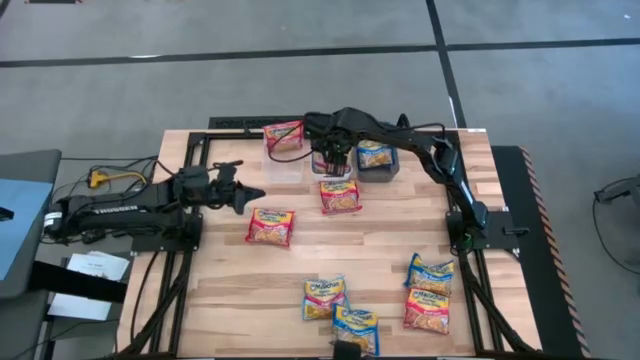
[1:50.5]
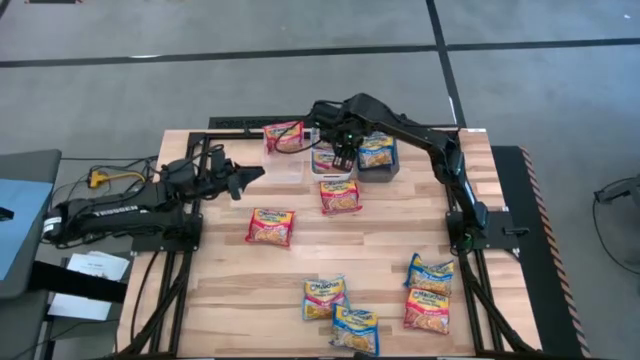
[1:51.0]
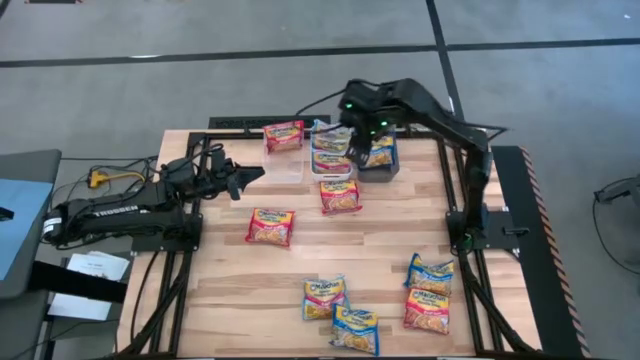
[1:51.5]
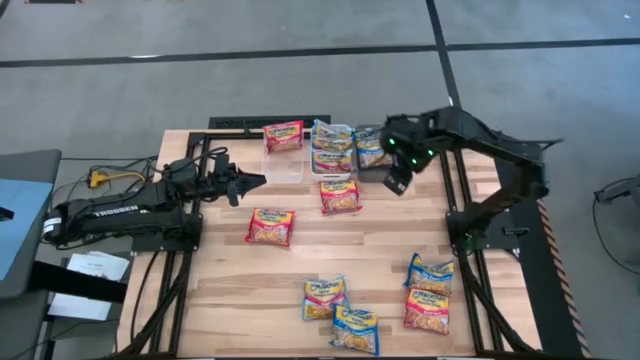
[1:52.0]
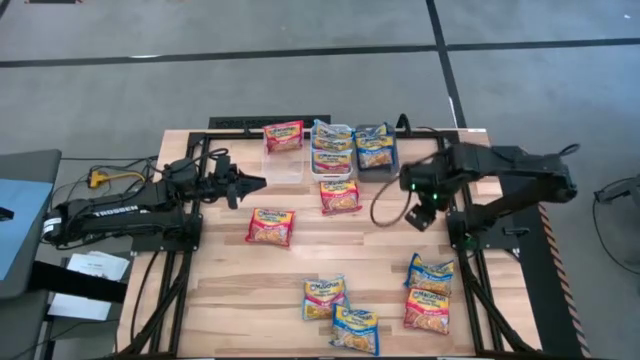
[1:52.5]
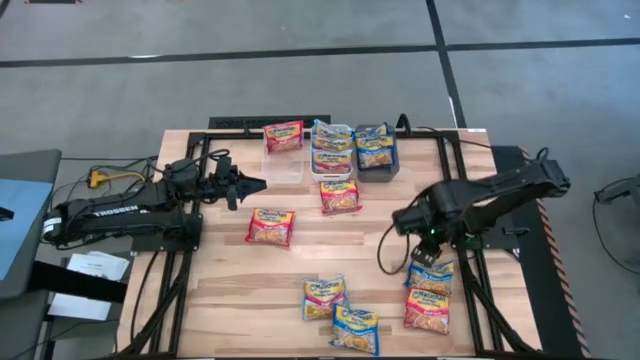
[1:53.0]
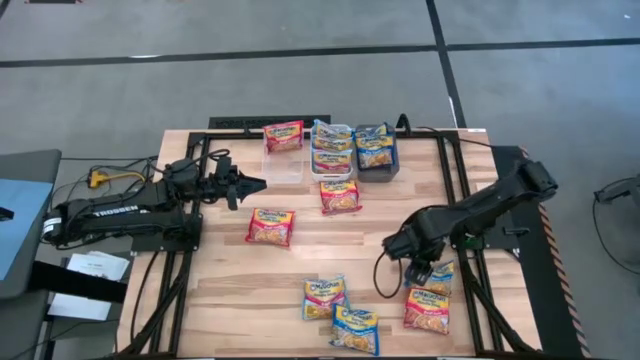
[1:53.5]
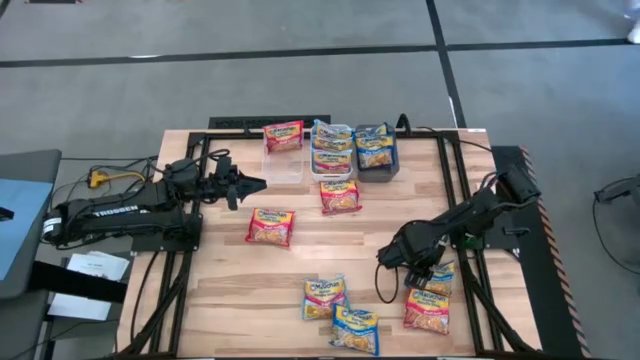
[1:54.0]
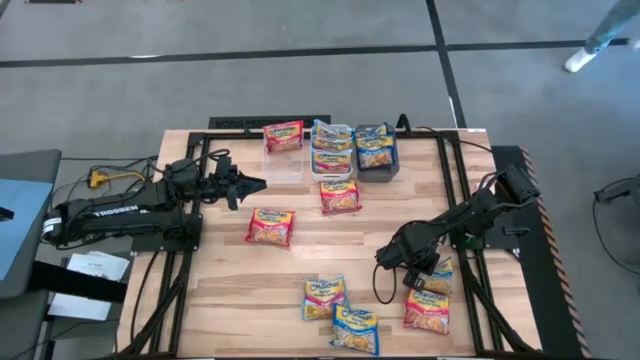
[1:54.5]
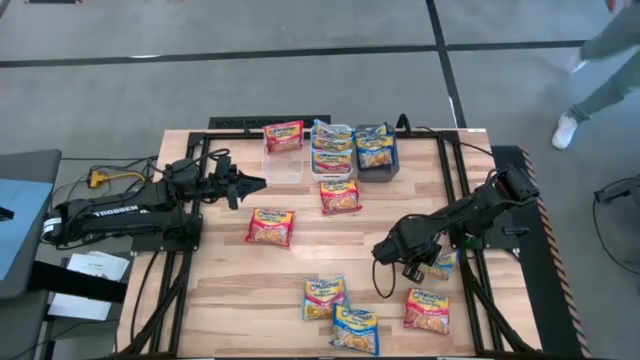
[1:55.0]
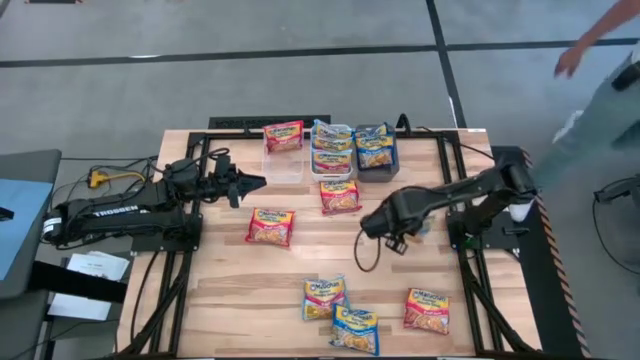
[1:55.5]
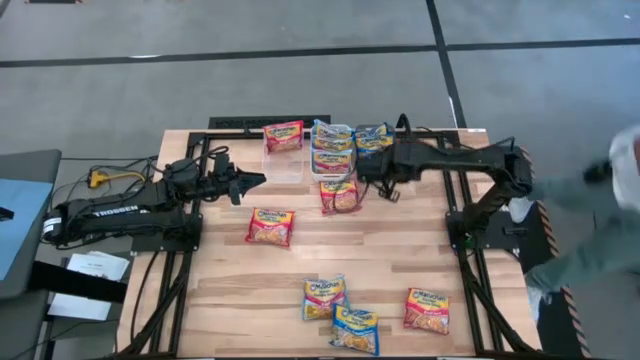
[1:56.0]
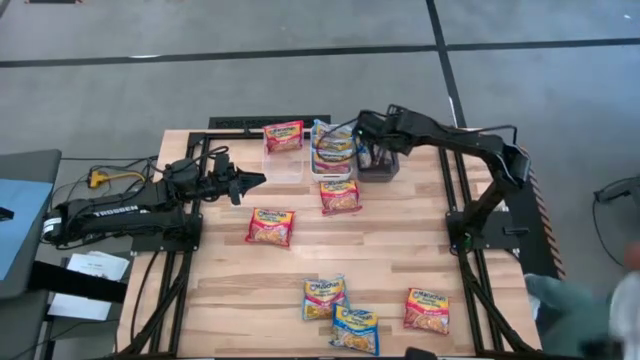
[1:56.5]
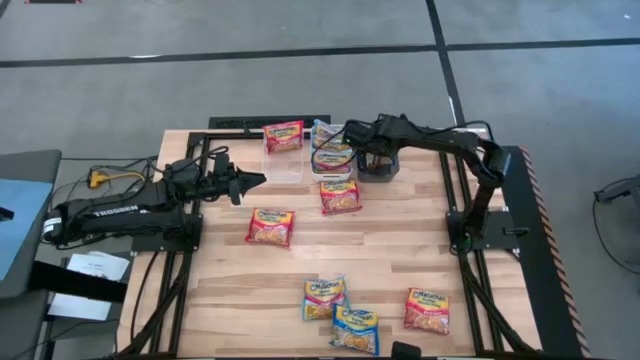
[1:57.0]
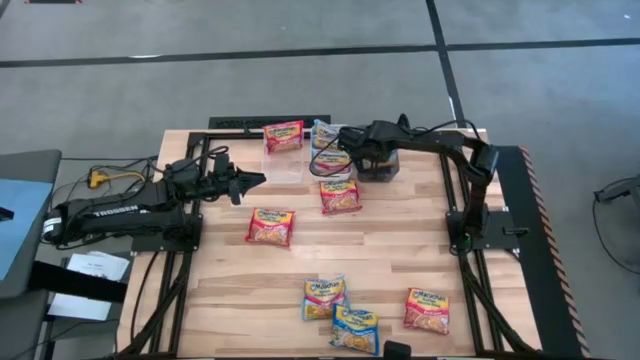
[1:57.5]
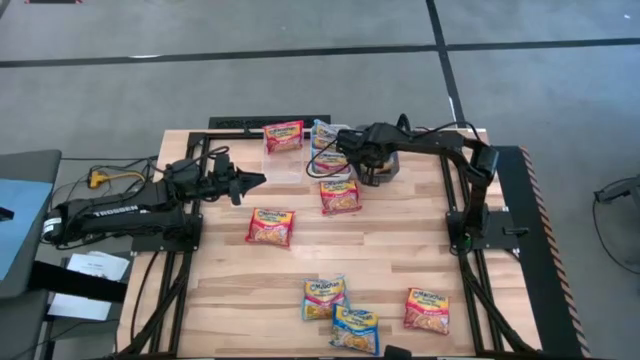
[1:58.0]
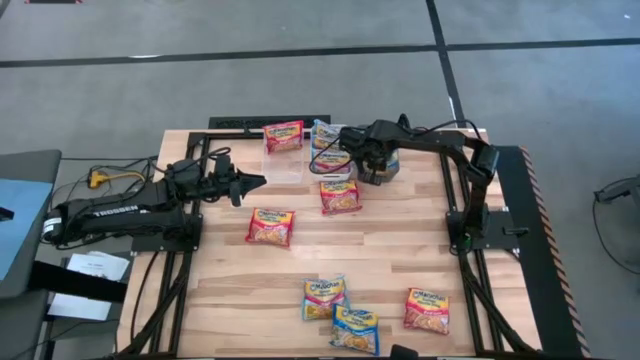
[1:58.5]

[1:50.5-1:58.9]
Task: Sort Maruchan noodles
Put the blue noodle pack into the black bin

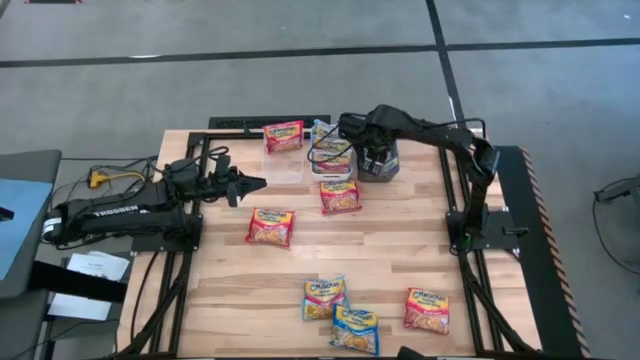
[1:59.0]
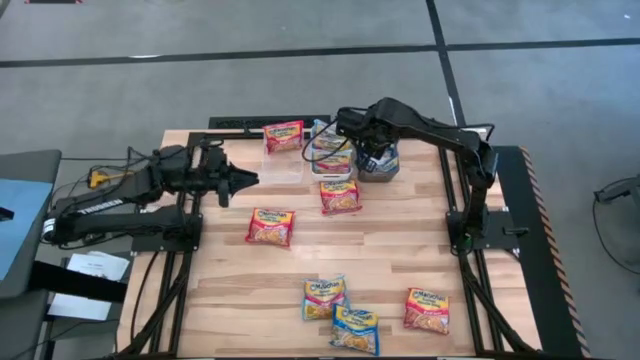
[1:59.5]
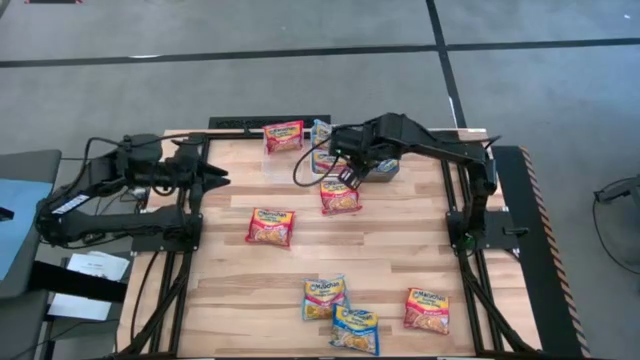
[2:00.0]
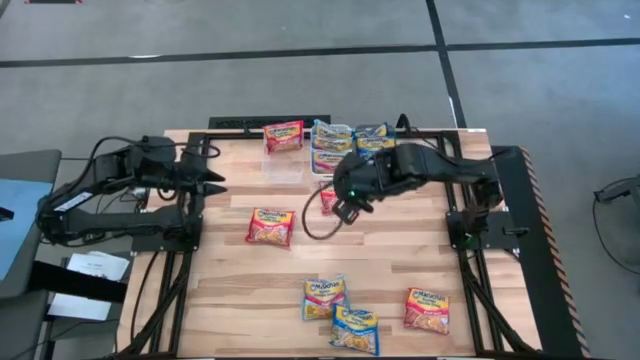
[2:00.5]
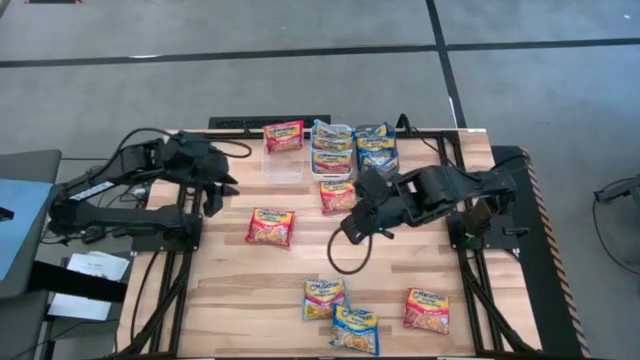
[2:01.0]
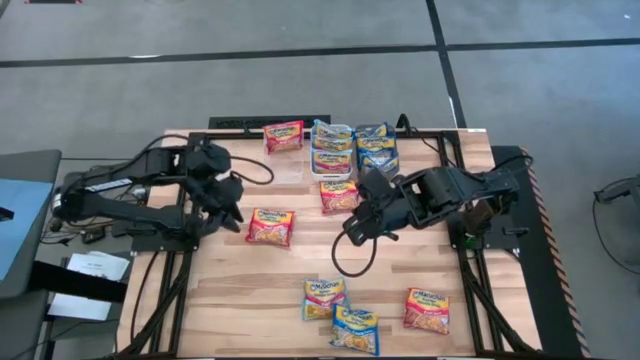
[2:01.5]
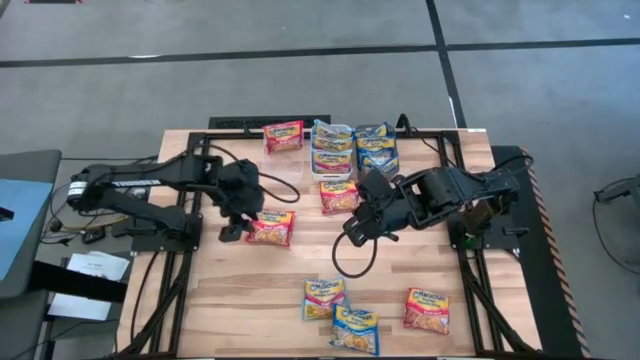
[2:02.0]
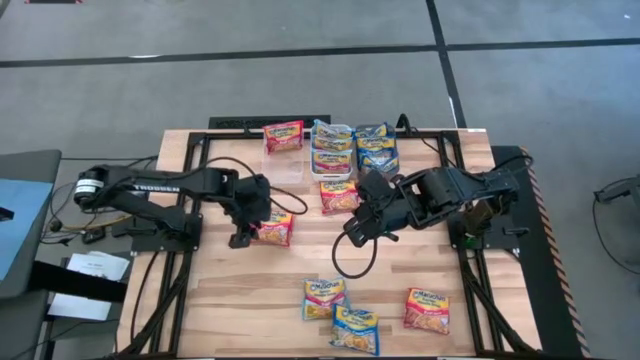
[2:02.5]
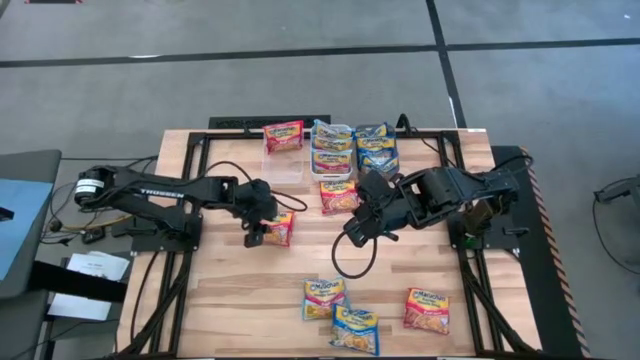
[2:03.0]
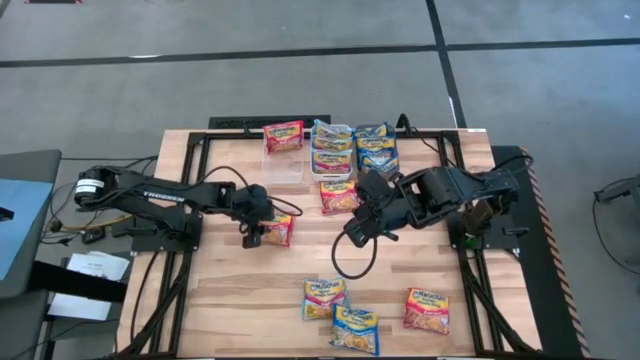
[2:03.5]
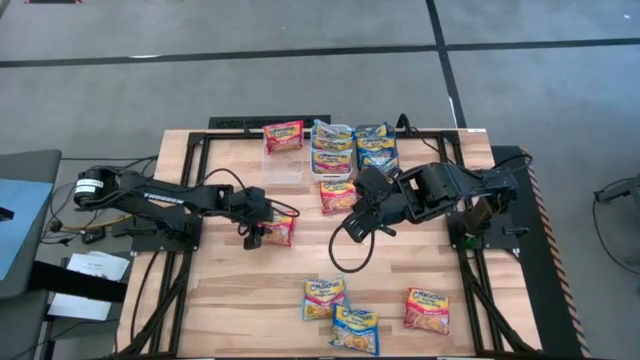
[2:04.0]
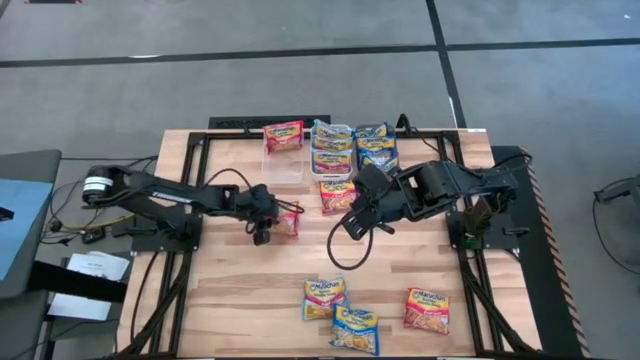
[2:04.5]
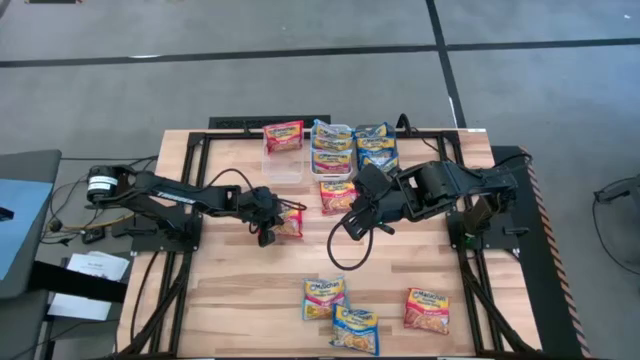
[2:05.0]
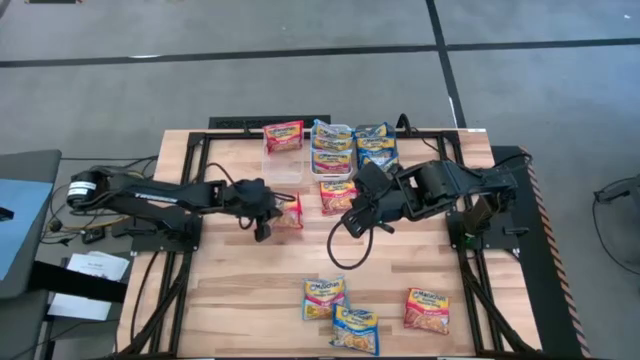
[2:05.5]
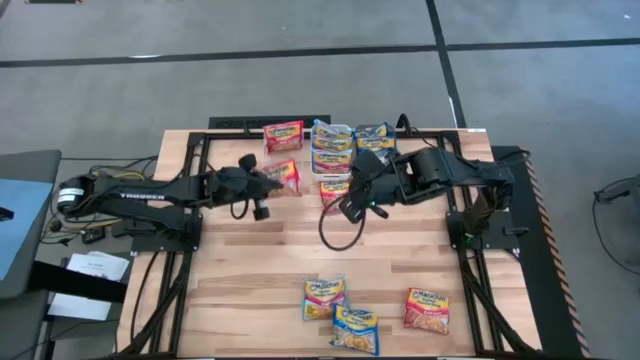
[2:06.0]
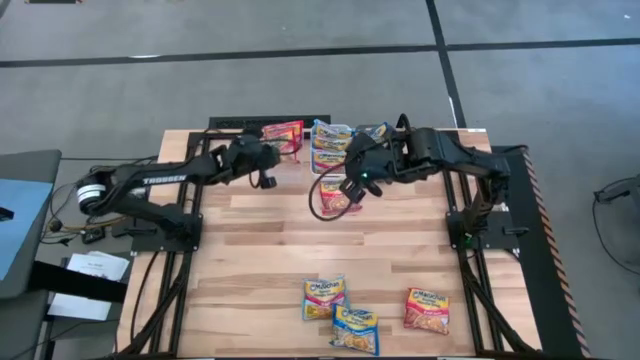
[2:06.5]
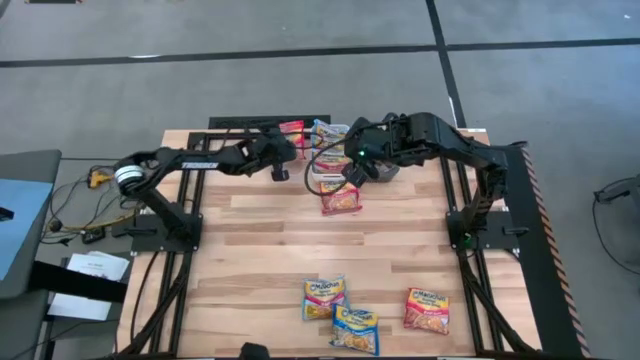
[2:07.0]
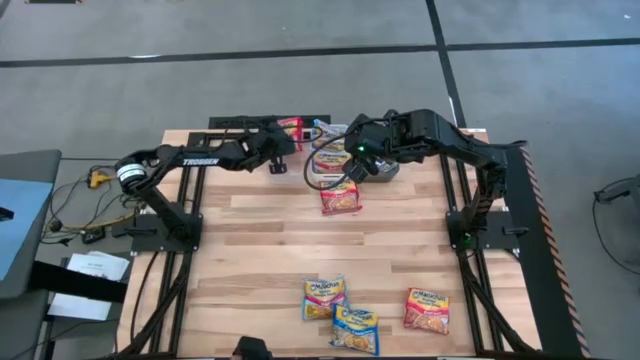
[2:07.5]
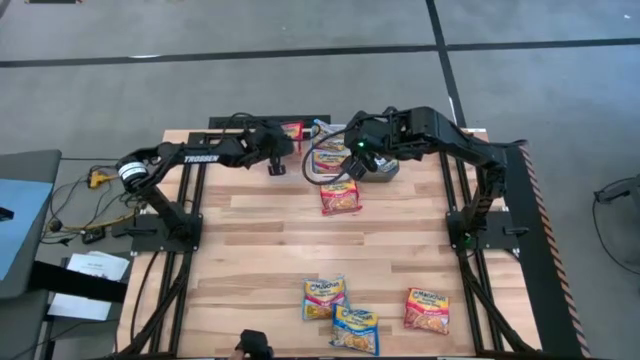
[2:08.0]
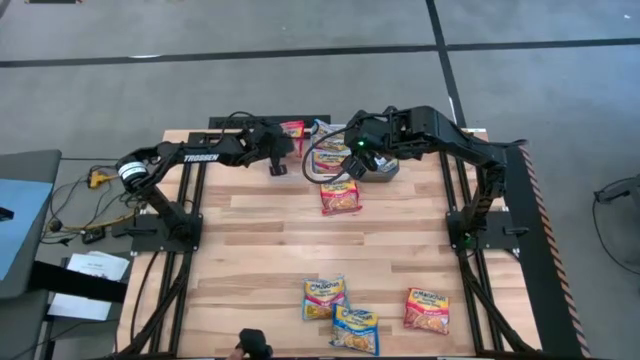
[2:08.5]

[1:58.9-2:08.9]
Put the red noodle pack into the transparent bin

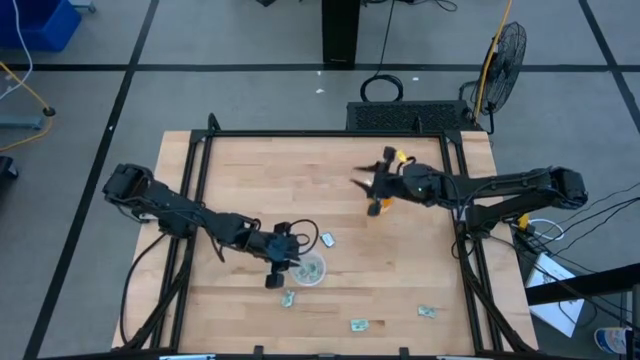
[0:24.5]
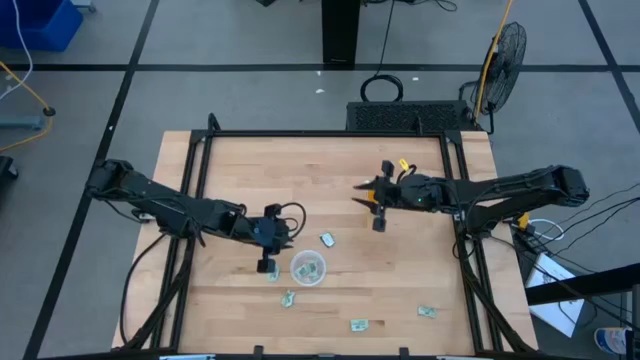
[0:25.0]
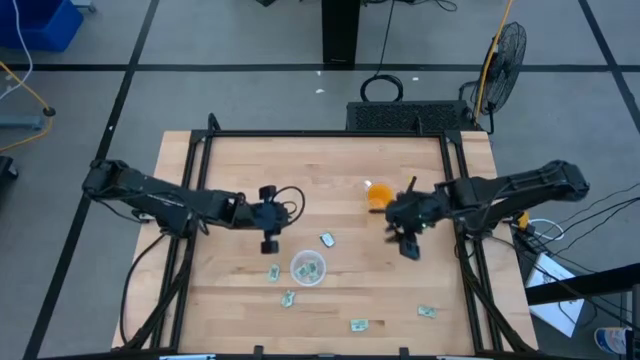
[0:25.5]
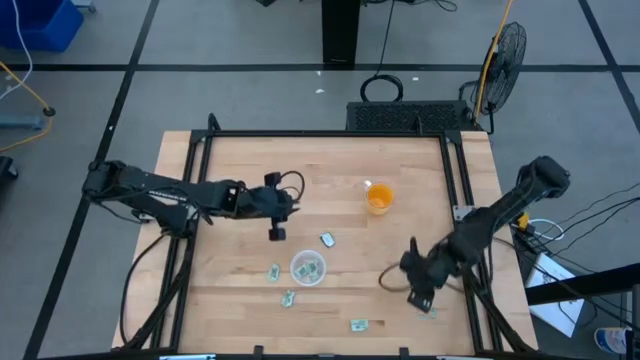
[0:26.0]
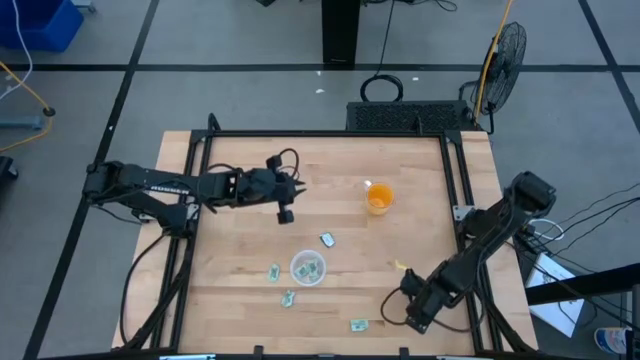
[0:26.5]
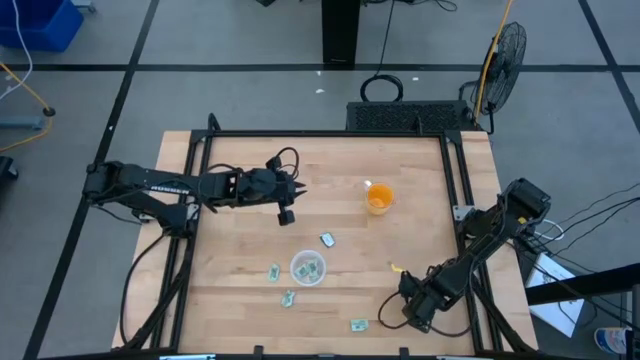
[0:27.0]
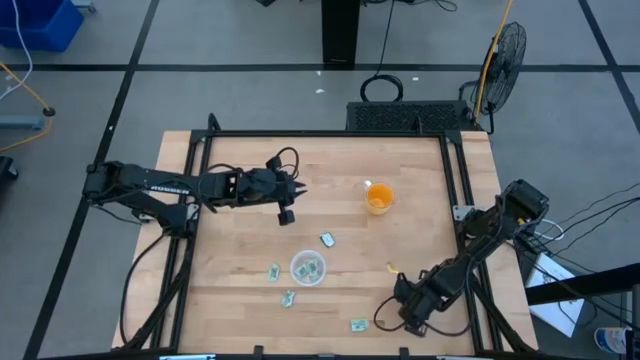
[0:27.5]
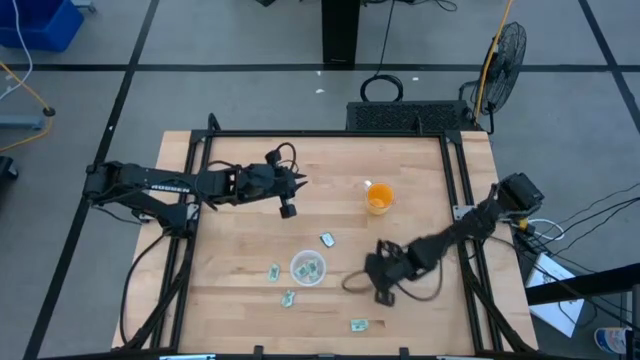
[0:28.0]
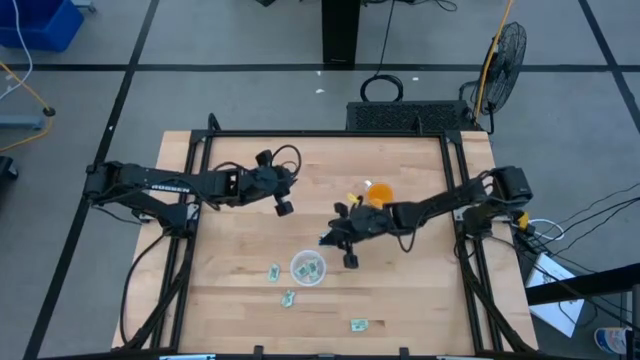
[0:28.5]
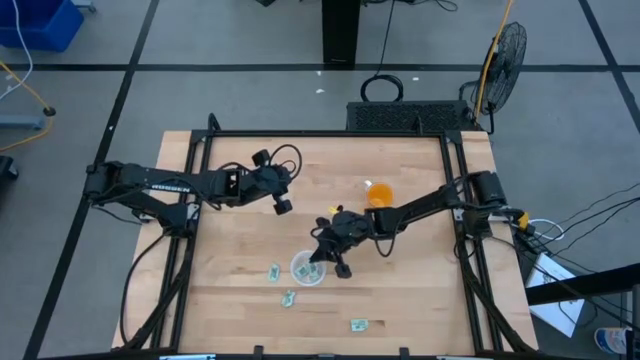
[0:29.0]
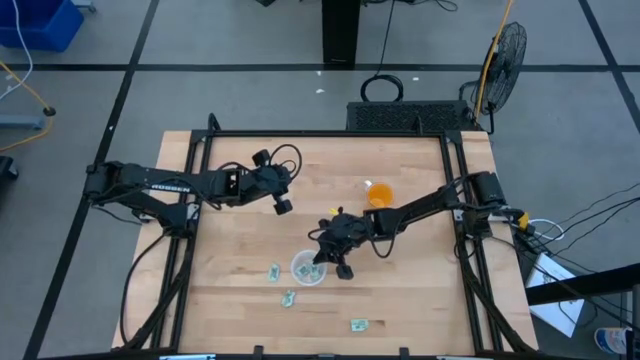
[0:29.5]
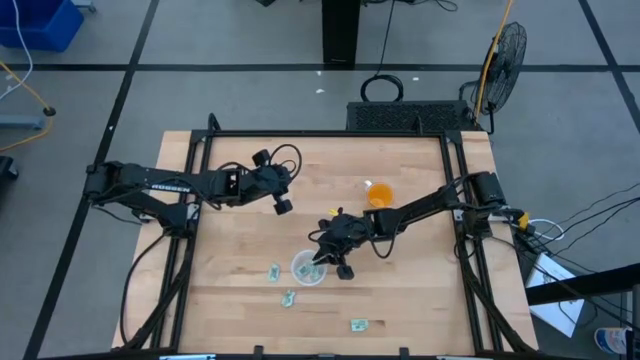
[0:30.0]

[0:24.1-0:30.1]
Task: Pick and place items into bin
Put the white stevia packet into the transparent bin
